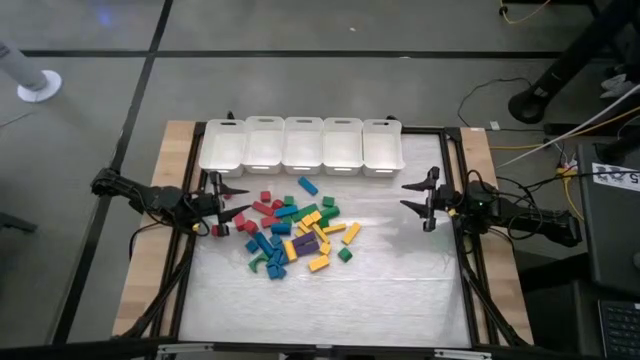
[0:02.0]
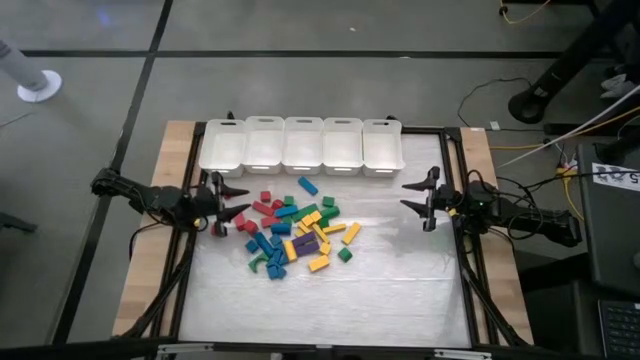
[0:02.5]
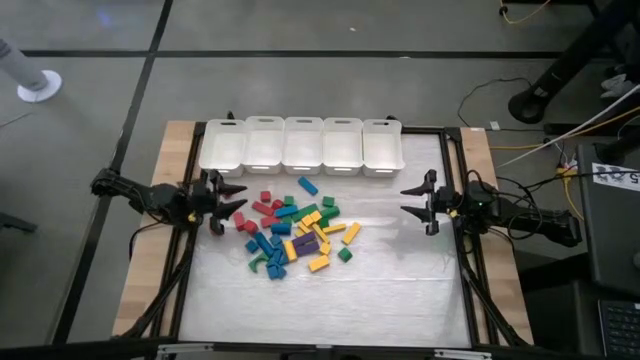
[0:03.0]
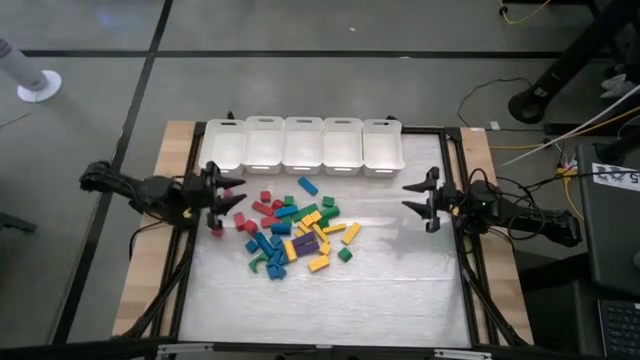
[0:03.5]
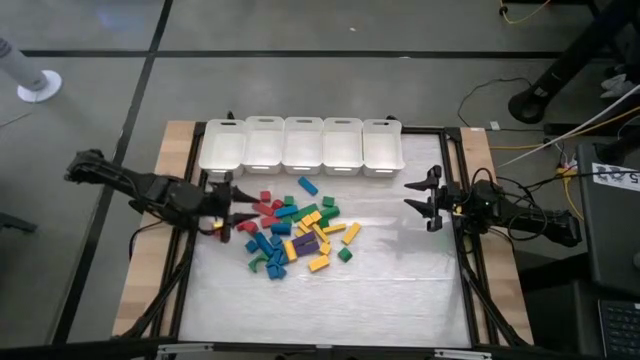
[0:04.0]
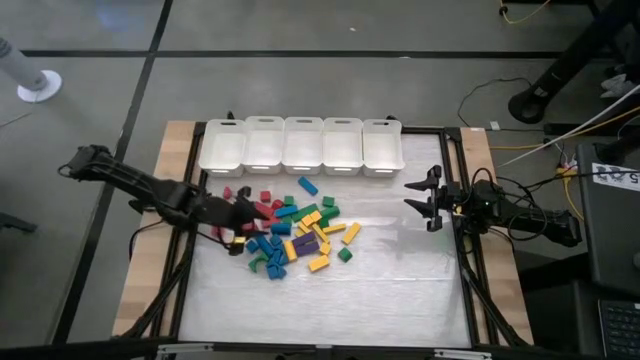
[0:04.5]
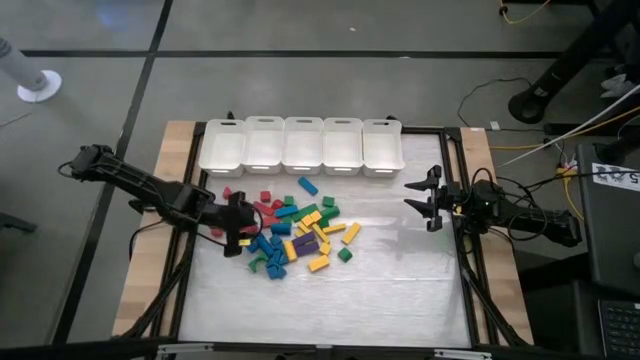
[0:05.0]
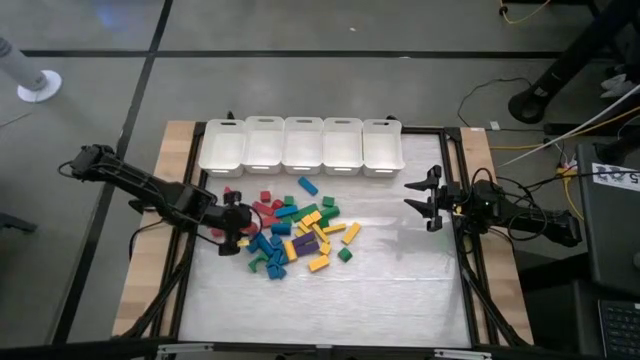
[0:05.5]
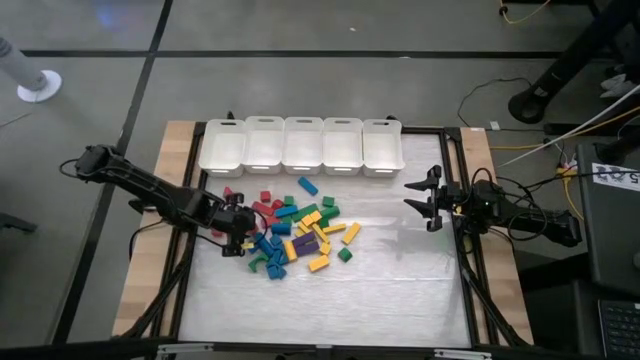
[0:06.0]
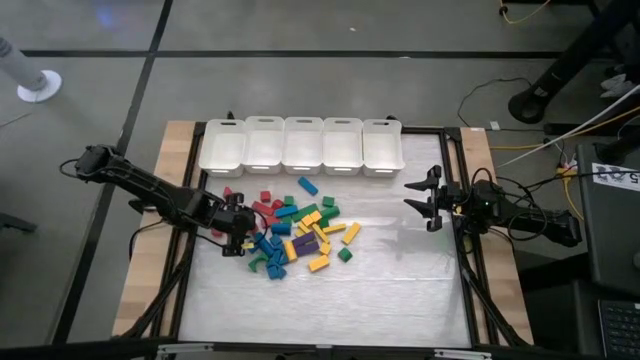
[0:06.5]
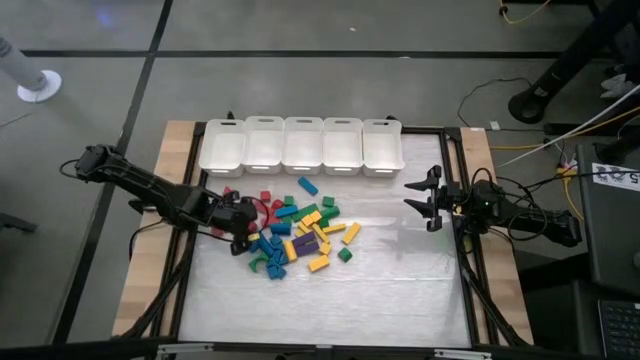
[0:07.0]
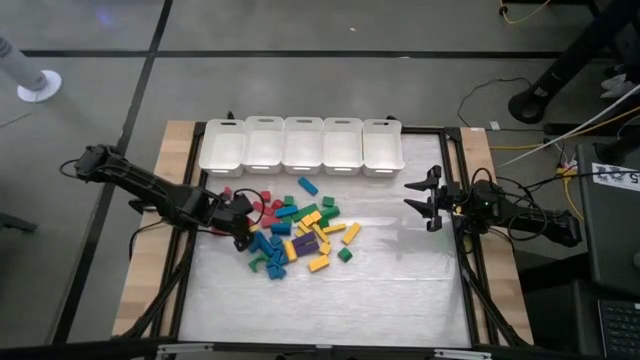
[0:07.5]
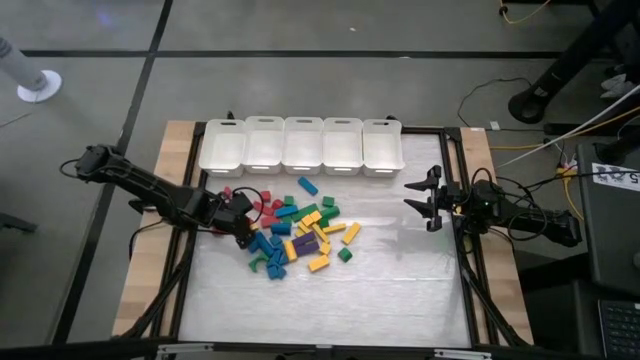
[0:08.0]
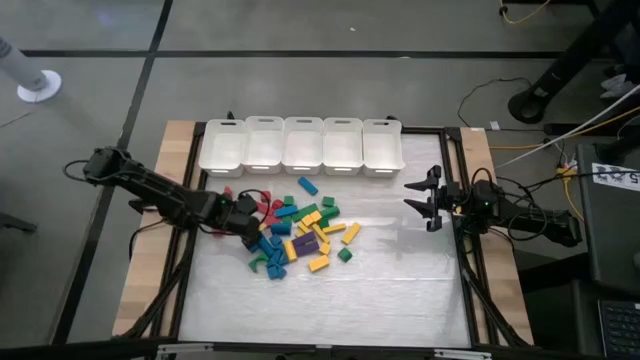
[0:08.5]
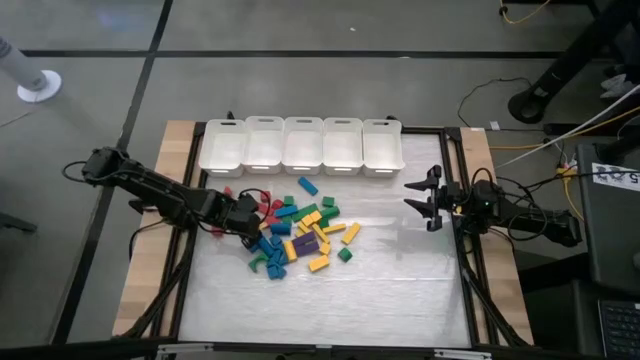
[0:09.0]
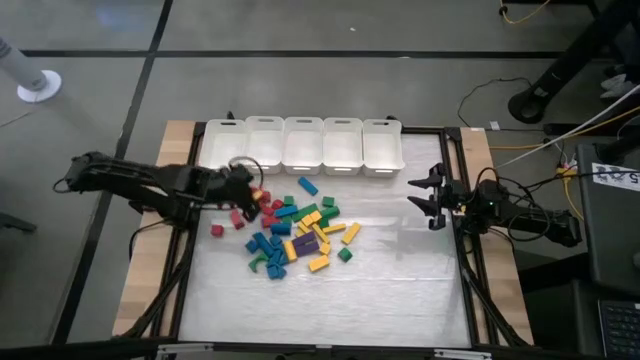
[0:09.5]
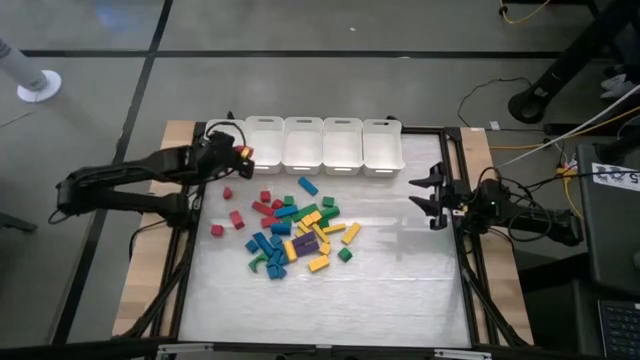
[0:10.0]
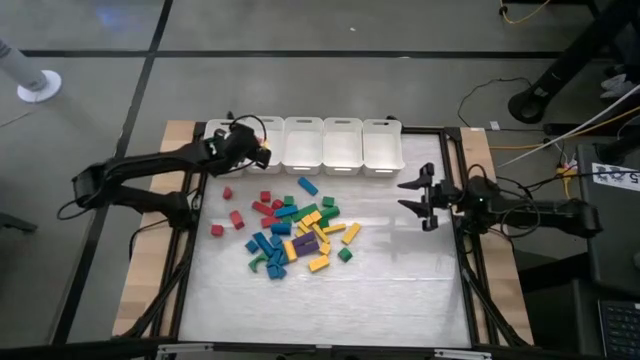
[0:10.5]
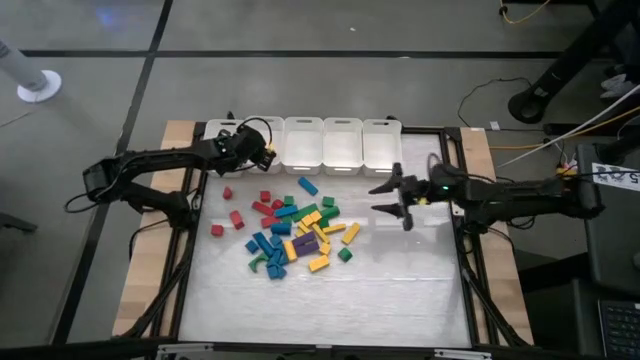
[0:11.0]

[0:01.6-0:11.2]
Task: Sort blocks
Put the red block into the middle left white bin

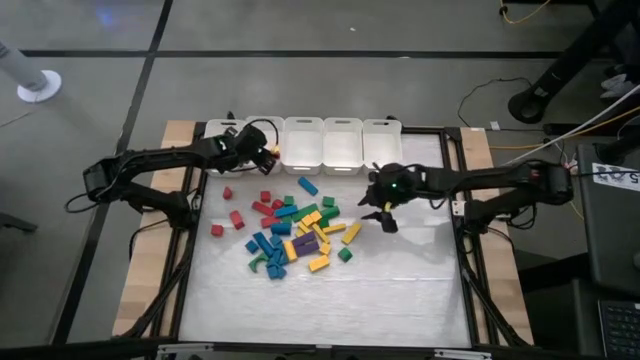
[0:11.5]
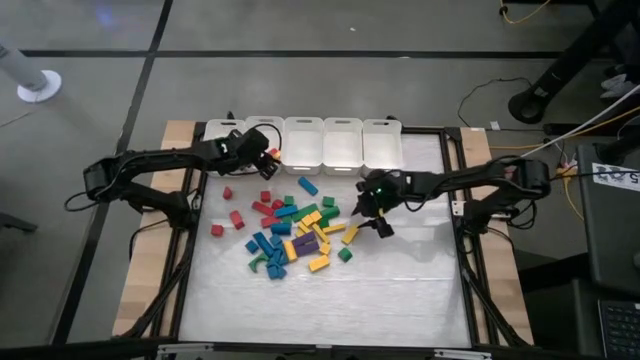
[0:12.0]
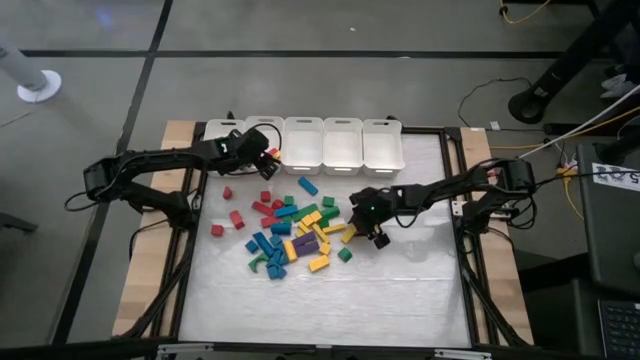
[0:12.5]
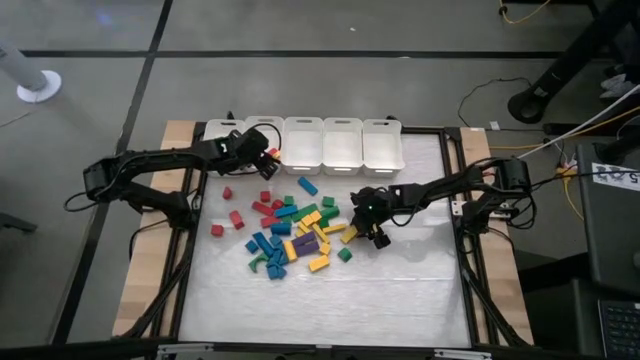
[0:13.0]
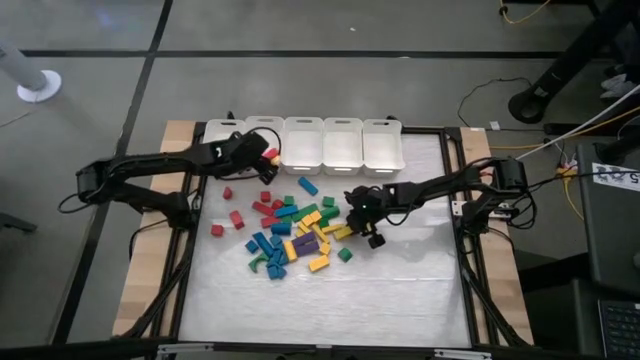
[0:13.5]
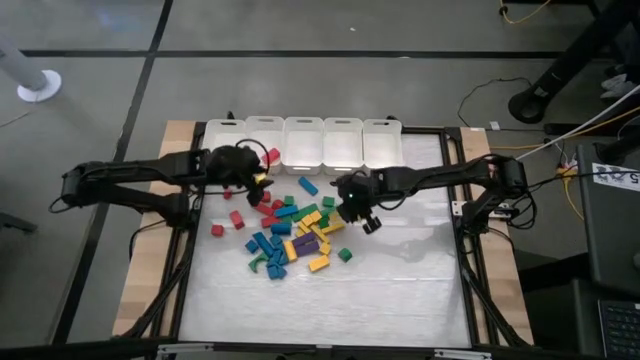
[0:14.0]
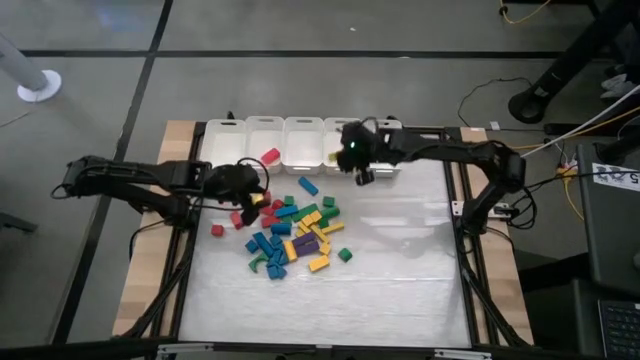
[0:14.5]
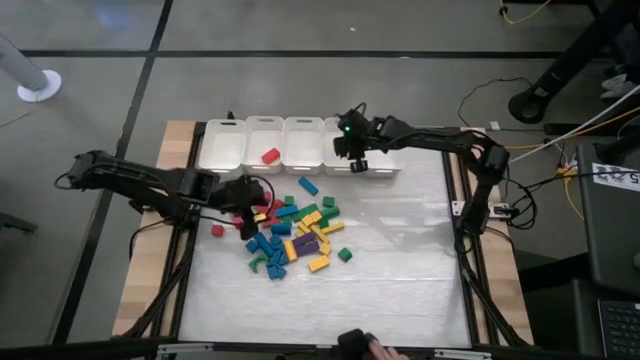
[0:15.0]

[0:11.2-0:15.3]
Put the yellow block into the middle right white bin

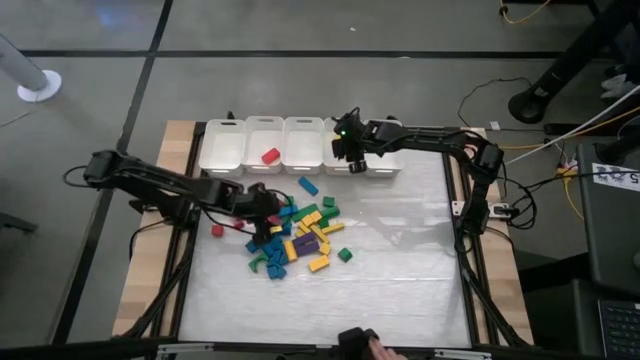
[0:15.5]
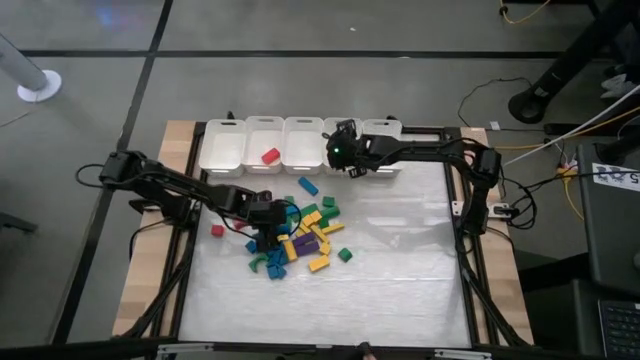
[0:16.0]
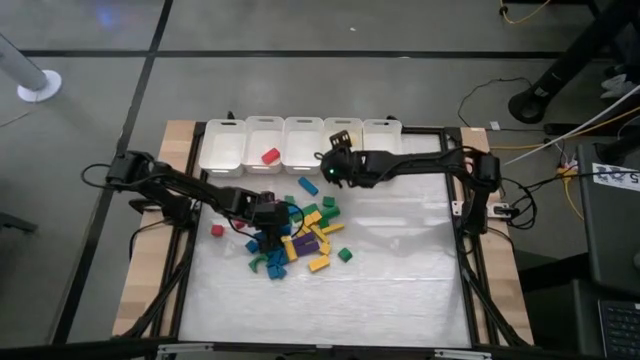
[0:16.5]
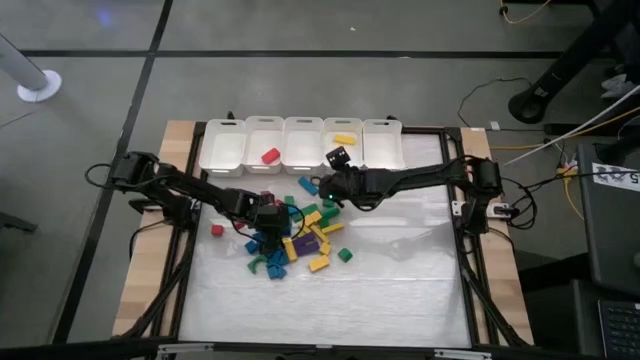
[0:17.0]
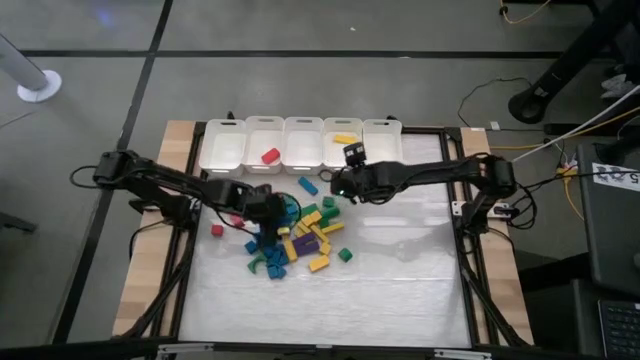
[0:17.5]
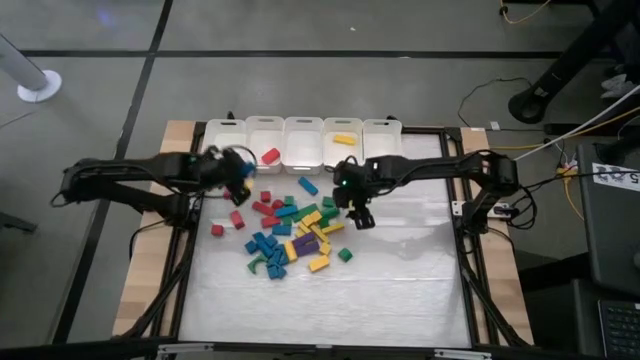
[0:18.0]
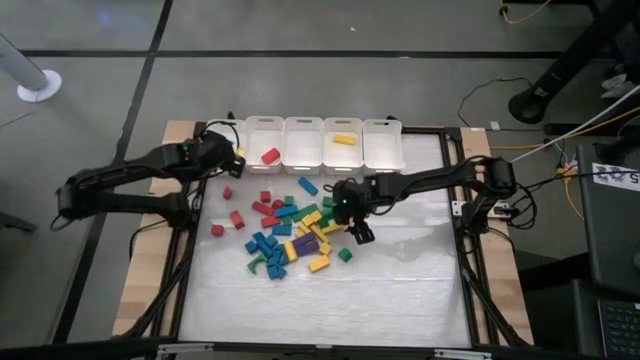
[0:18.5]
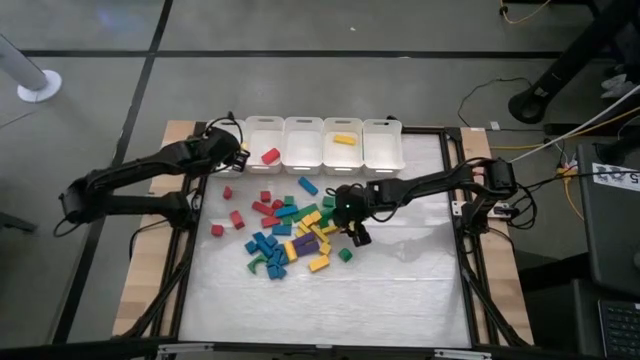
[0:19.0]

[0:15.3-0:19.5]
Put the blue block into the left white bin

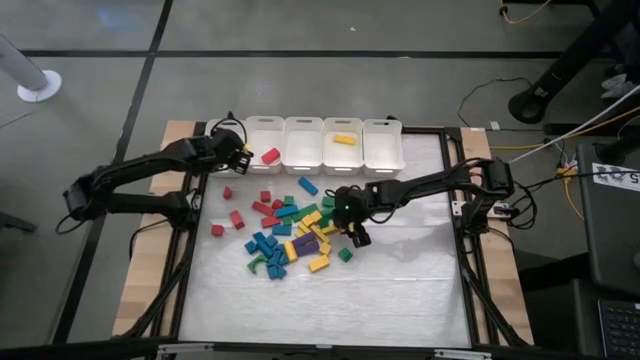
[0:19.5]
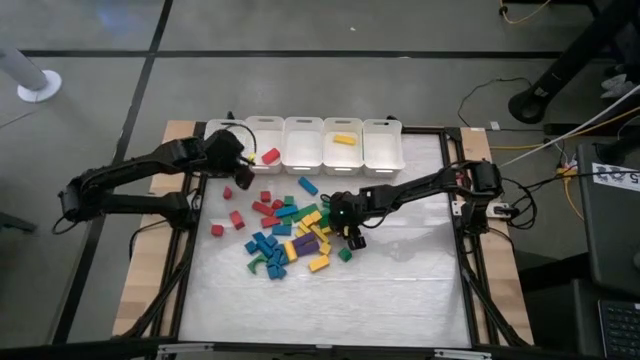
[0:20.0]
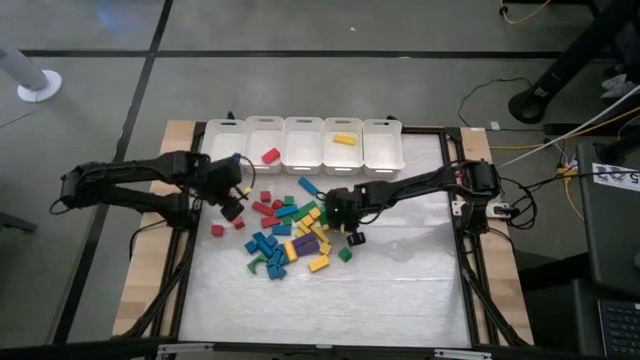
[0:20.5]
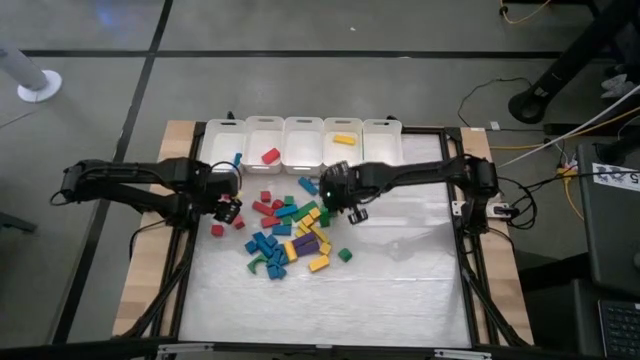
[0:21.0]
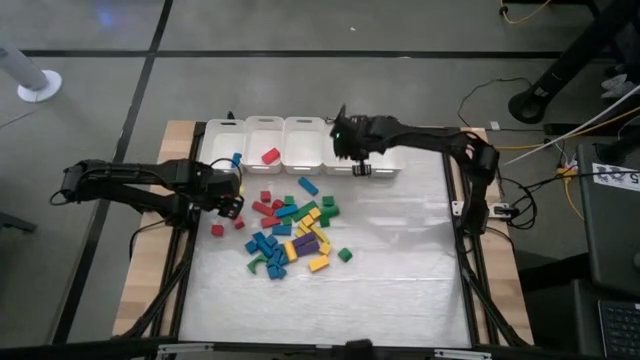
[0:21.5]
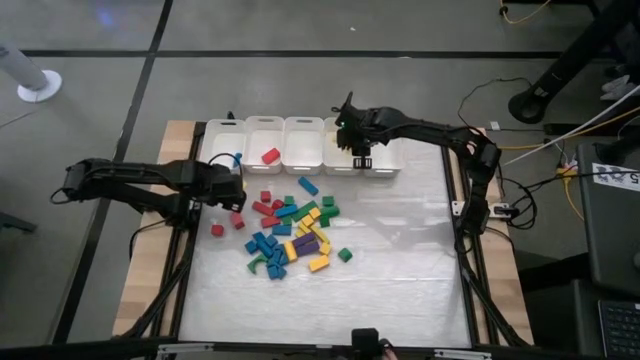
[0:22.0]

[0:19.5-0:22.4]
Put the yellow block into the middle right white bin

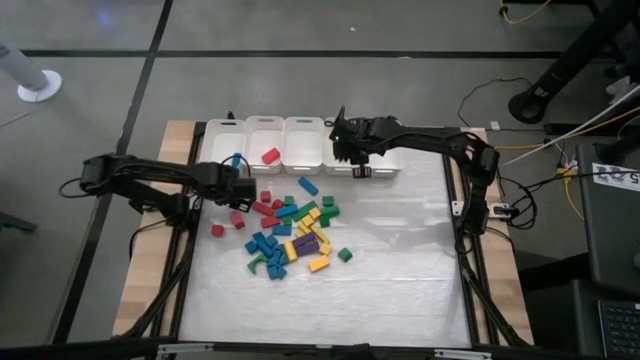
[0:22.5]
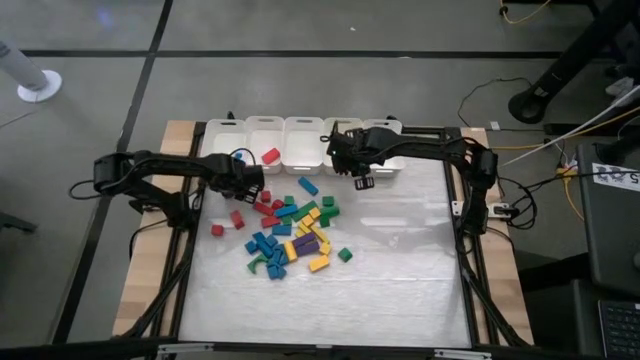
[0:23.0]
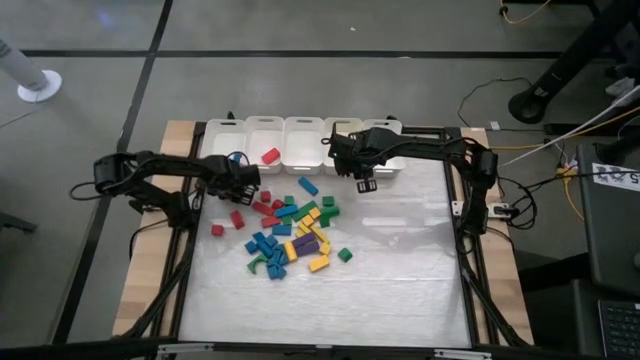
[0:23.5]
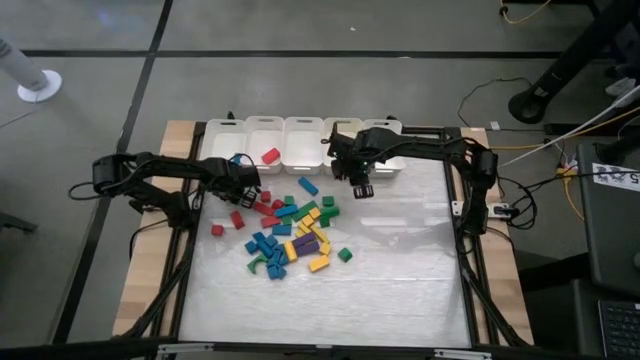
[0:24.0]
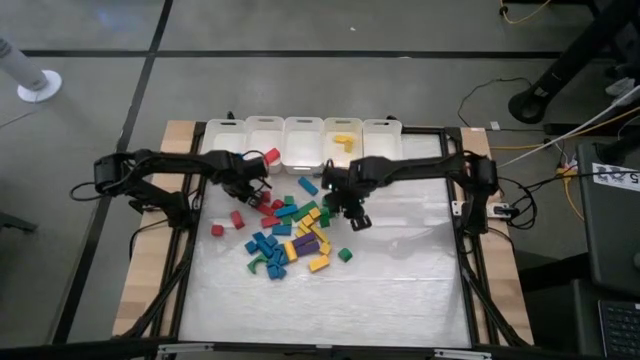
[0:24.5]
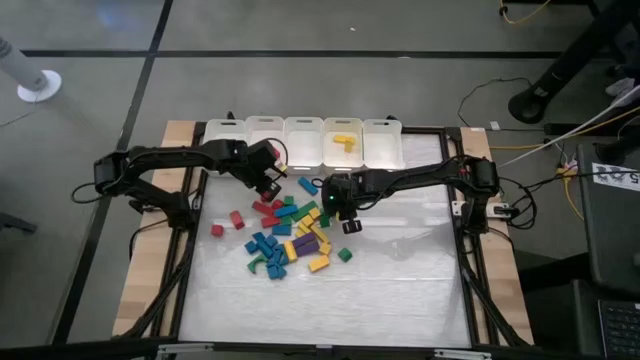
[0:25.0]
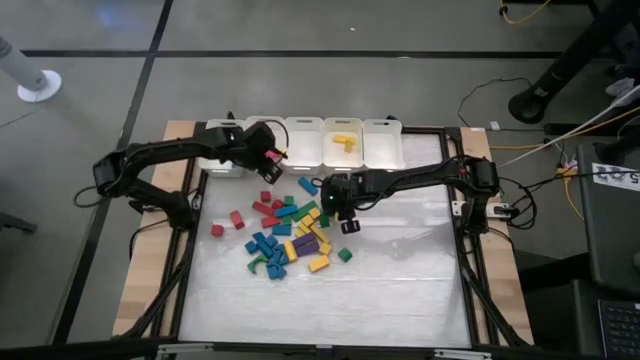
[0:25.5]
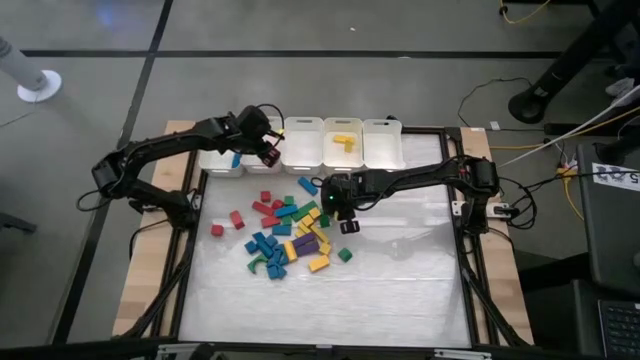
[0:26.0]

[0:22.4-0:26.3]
Put the red block into the middle left white bin
